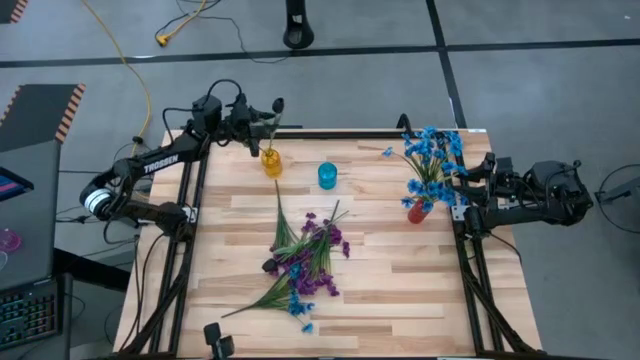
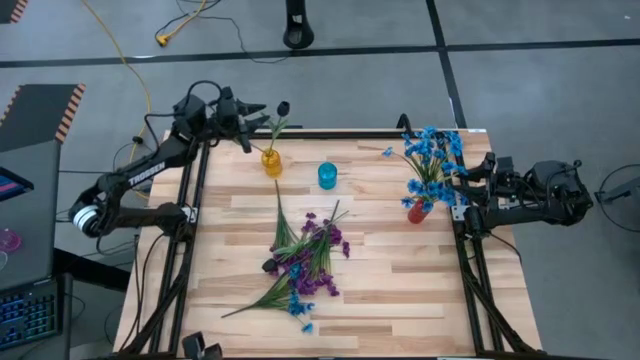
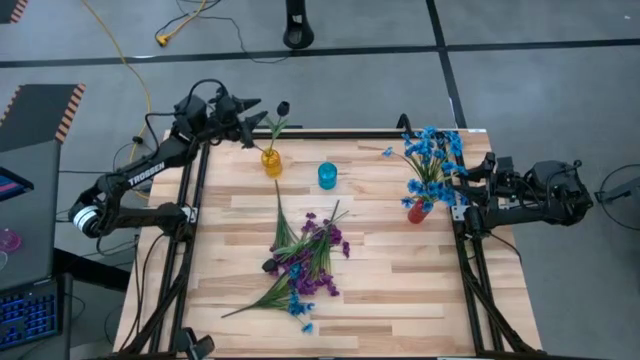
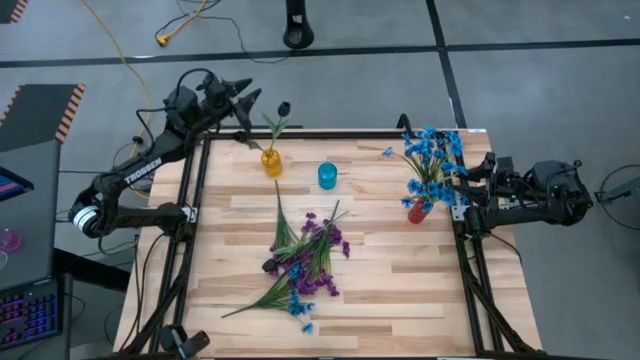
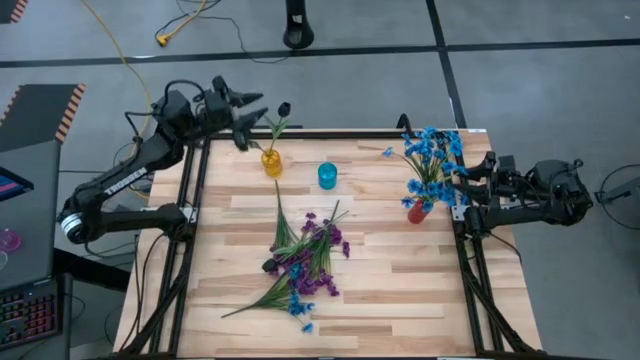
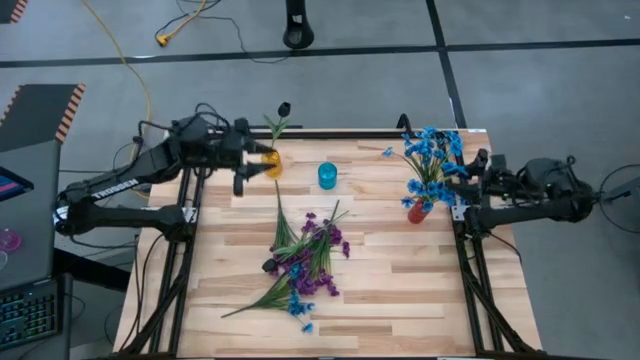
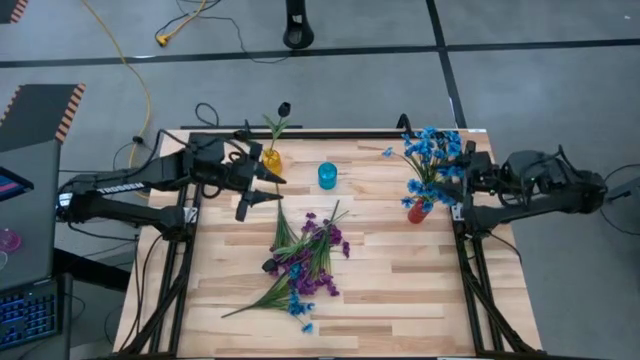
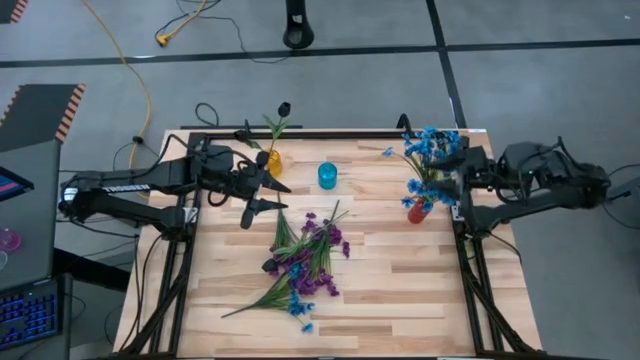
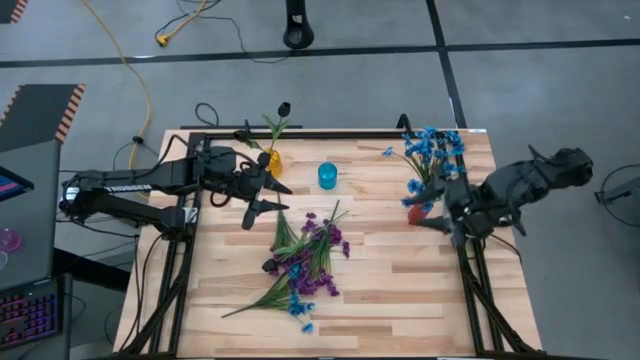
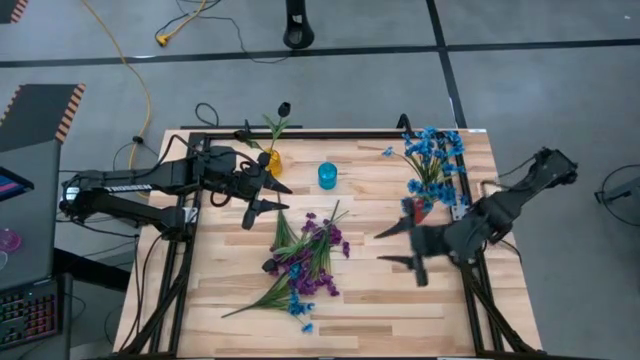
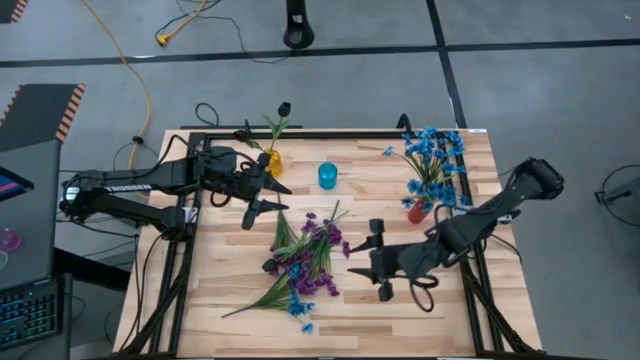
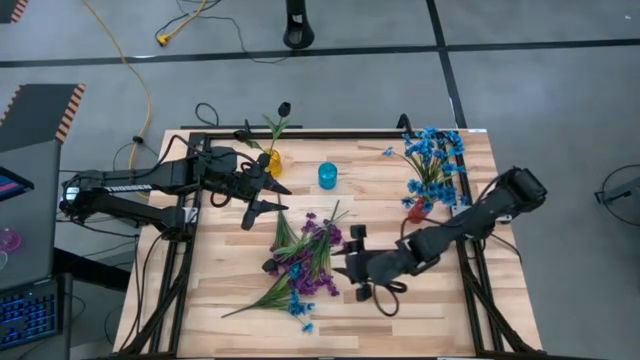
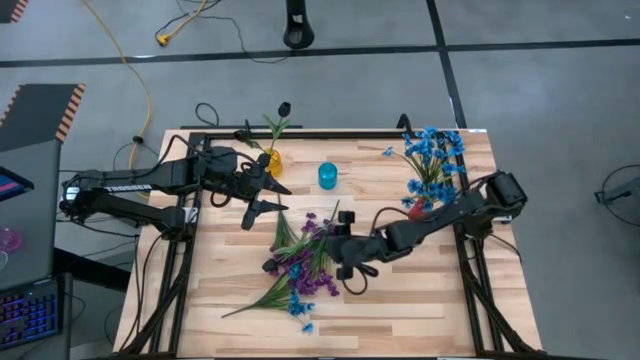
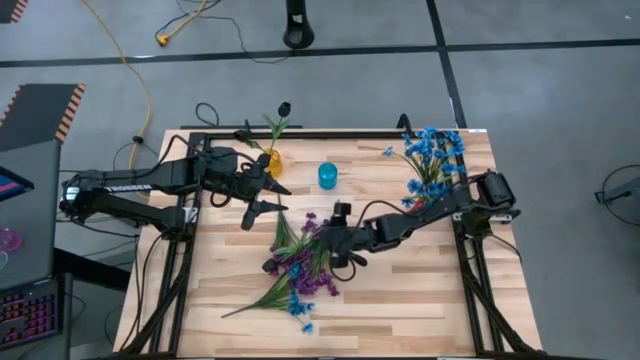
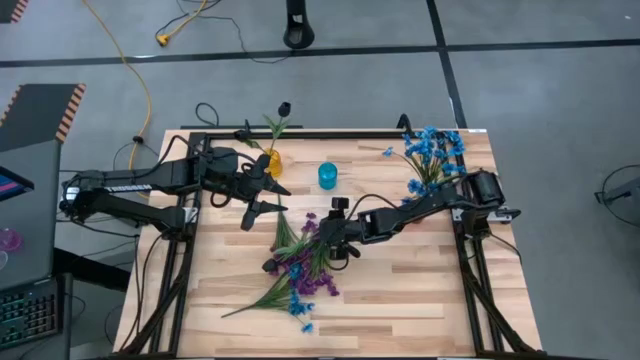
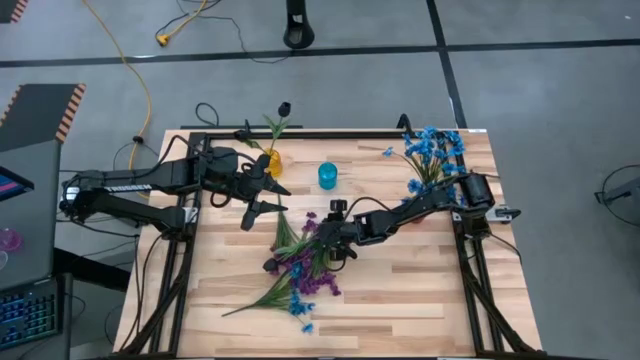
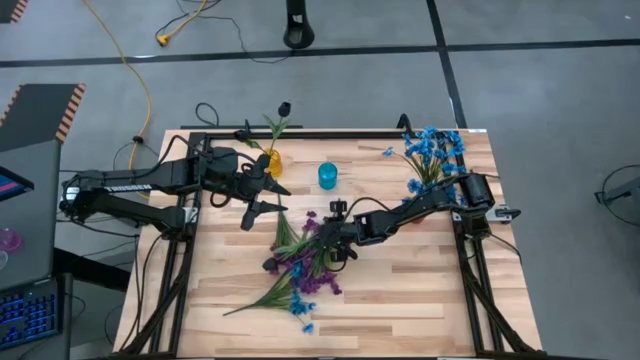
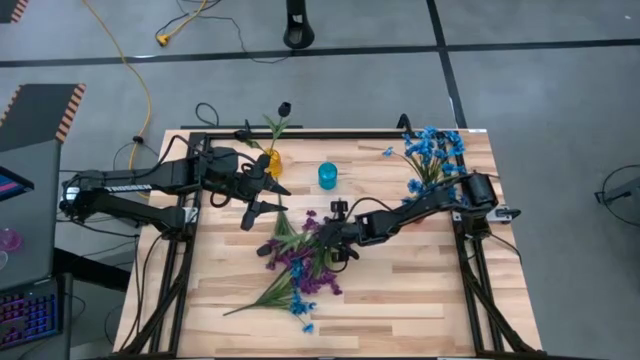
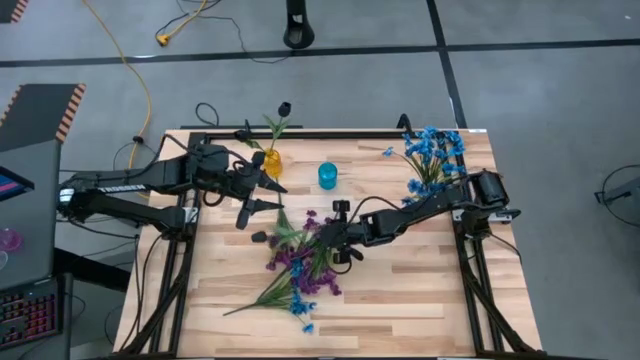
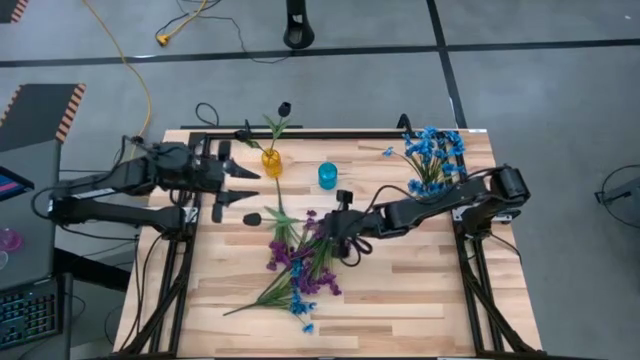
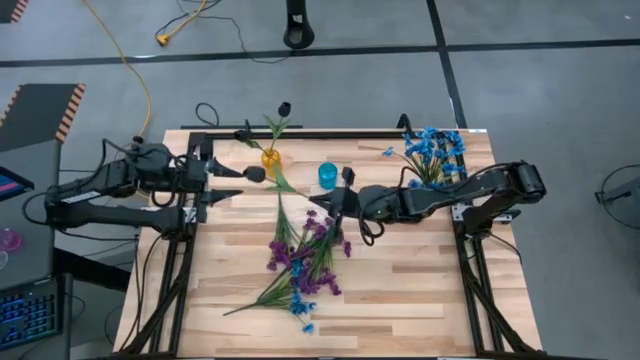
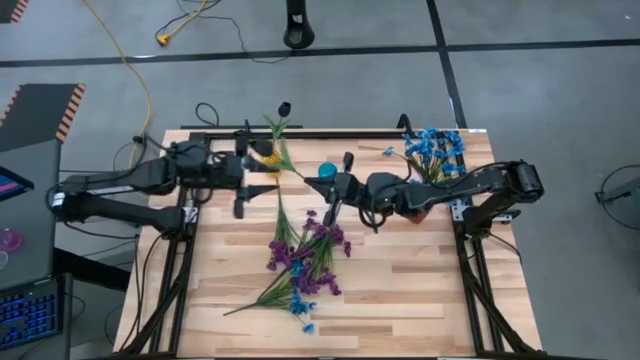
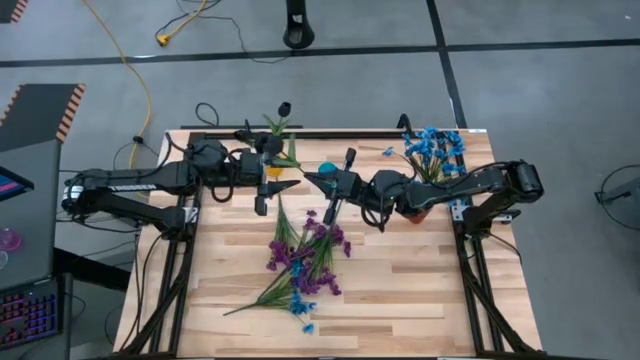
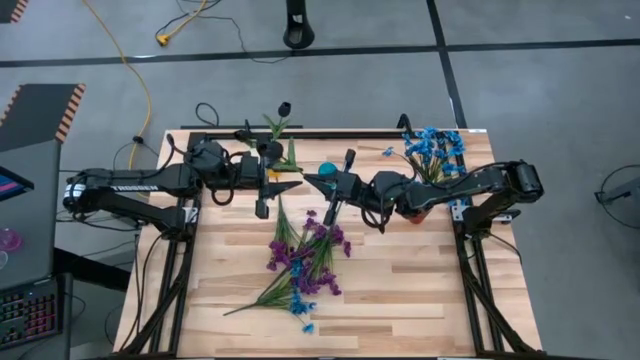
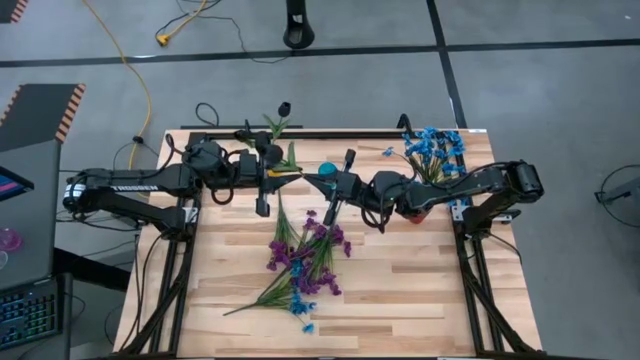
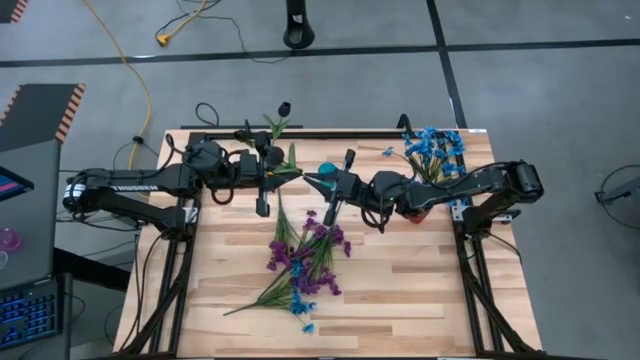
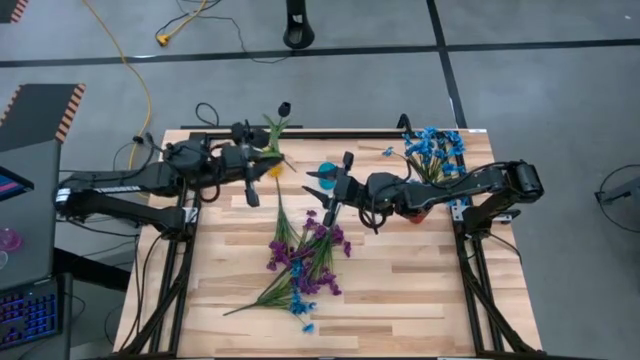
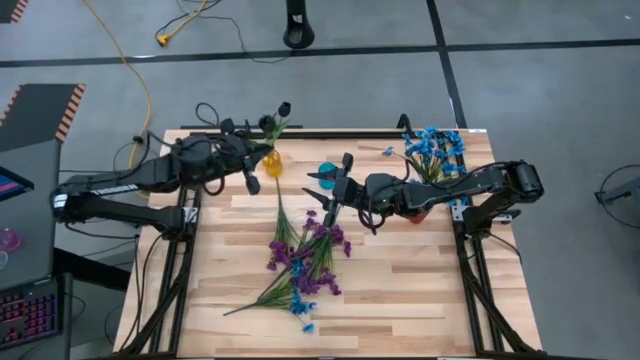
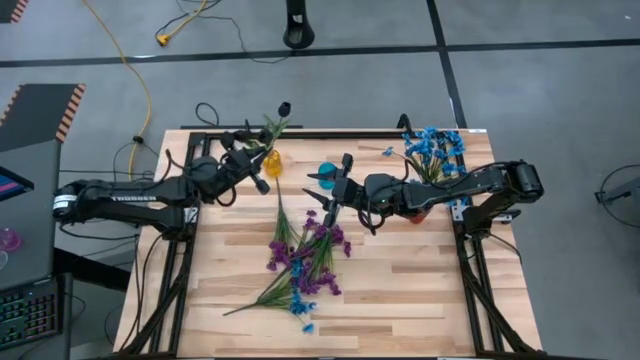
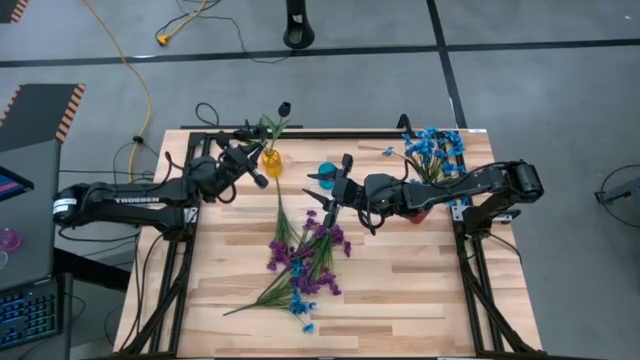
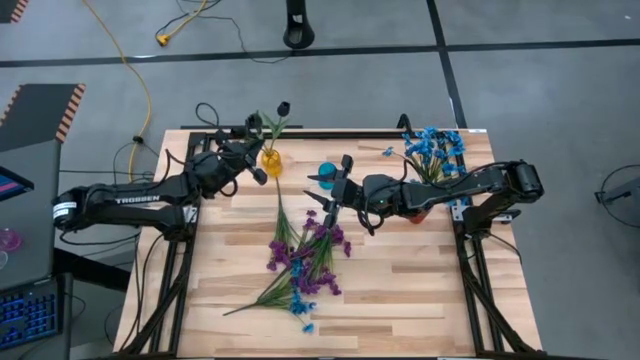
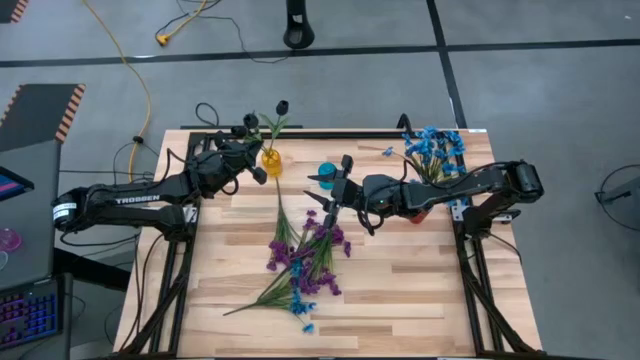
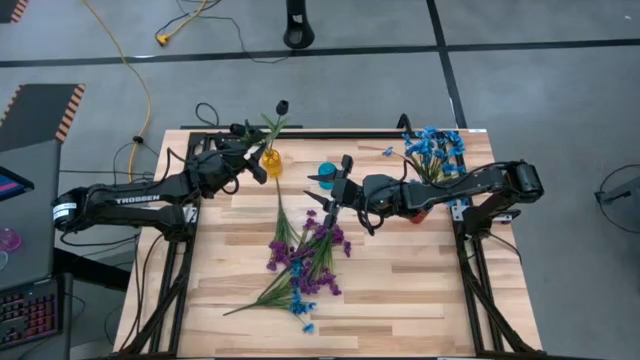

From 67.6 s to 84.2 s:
Task: Sort flowers into vase by color
Put the black tulip into the yellow vase
